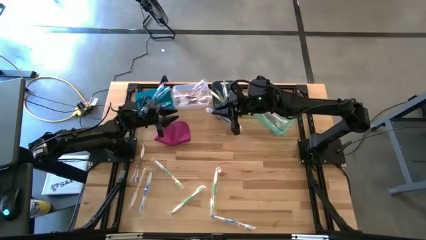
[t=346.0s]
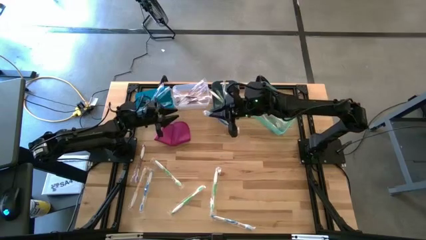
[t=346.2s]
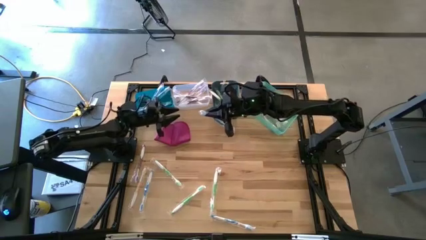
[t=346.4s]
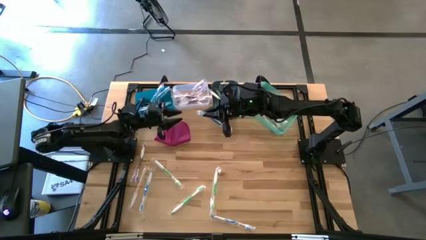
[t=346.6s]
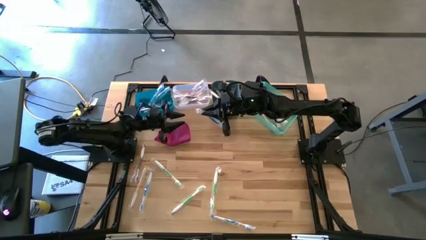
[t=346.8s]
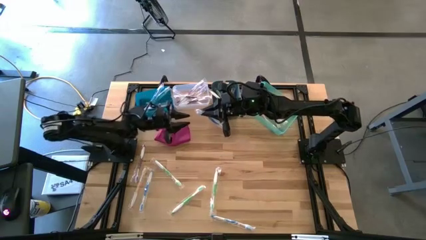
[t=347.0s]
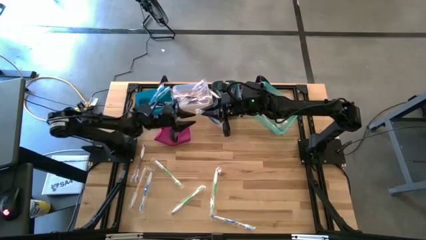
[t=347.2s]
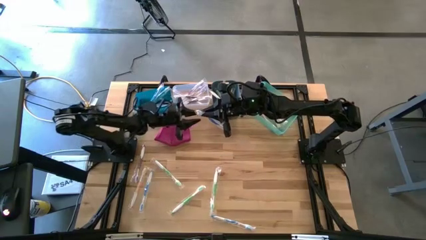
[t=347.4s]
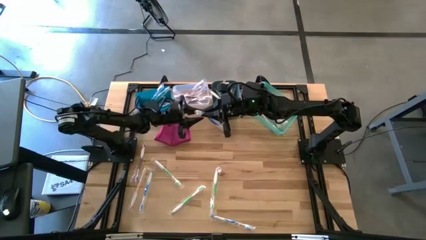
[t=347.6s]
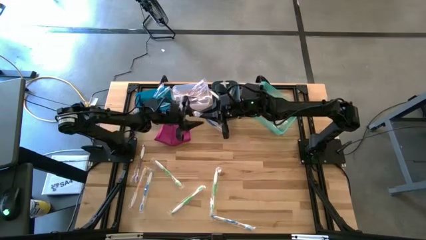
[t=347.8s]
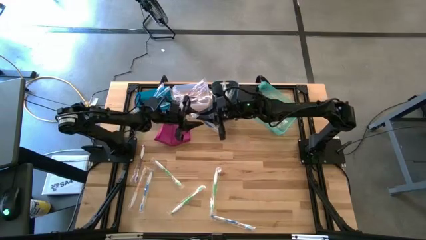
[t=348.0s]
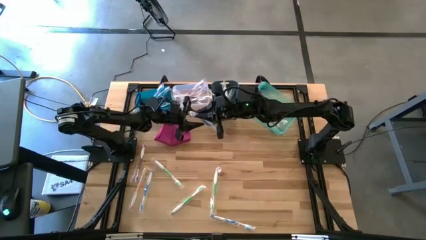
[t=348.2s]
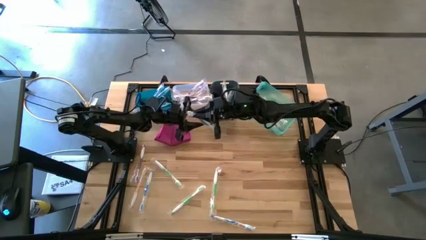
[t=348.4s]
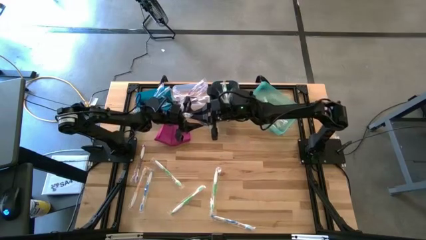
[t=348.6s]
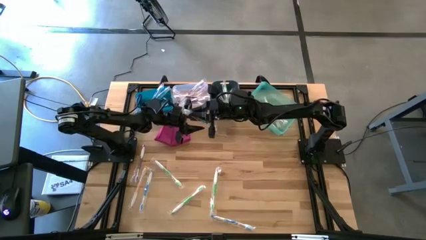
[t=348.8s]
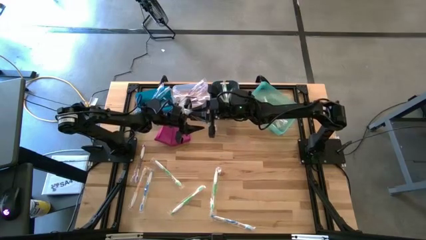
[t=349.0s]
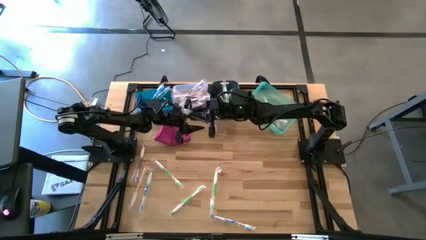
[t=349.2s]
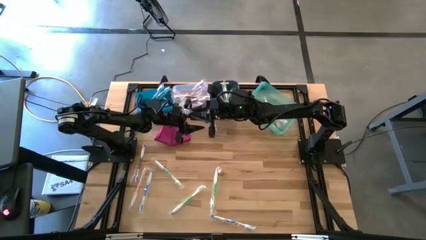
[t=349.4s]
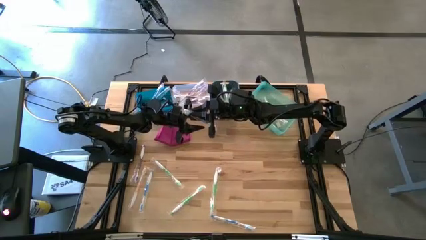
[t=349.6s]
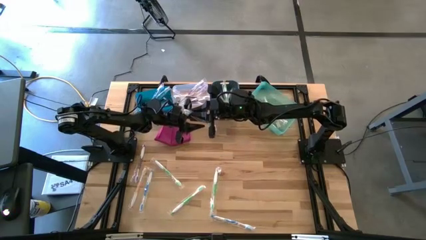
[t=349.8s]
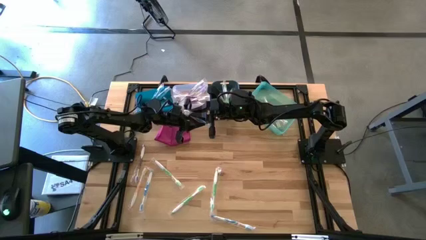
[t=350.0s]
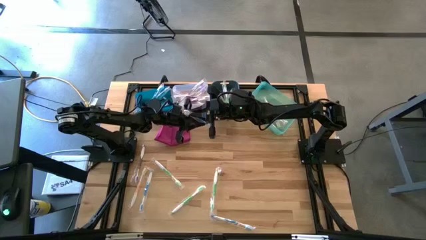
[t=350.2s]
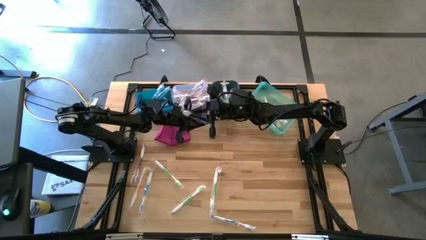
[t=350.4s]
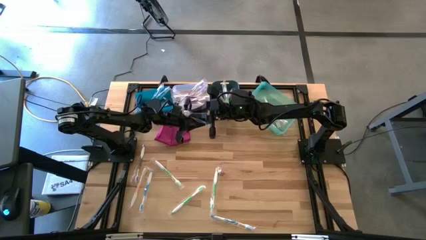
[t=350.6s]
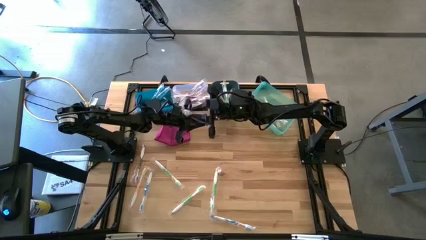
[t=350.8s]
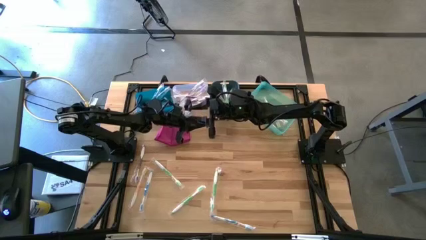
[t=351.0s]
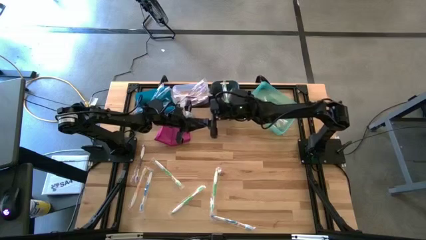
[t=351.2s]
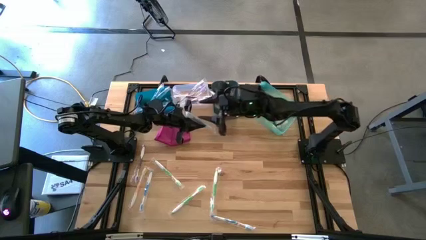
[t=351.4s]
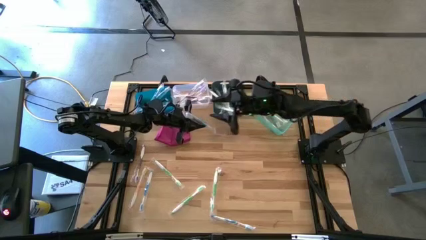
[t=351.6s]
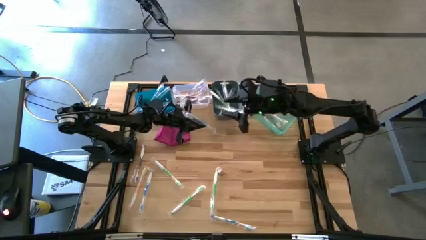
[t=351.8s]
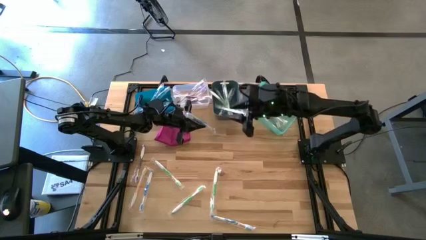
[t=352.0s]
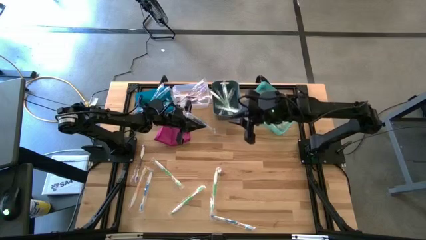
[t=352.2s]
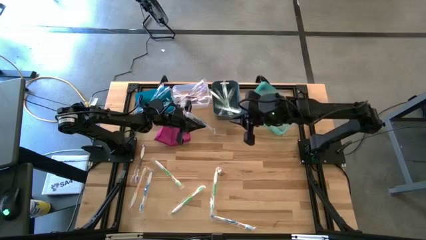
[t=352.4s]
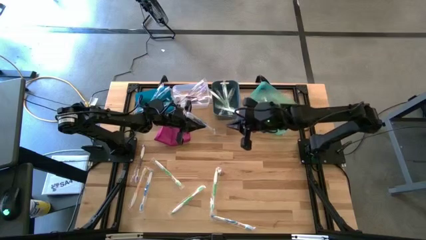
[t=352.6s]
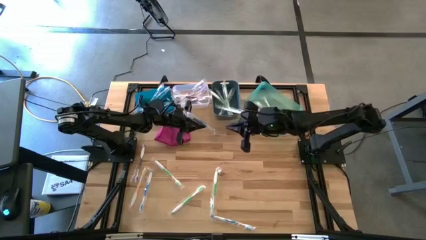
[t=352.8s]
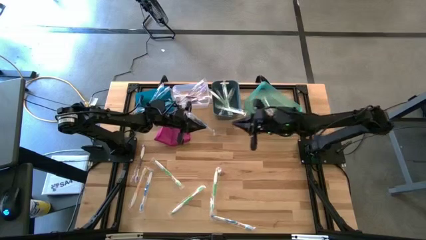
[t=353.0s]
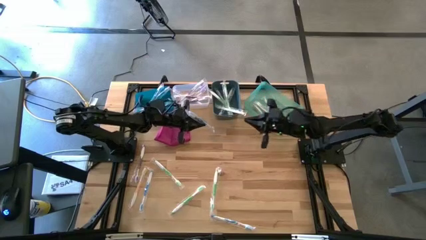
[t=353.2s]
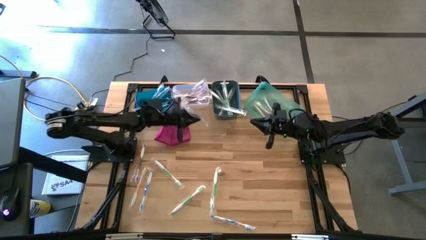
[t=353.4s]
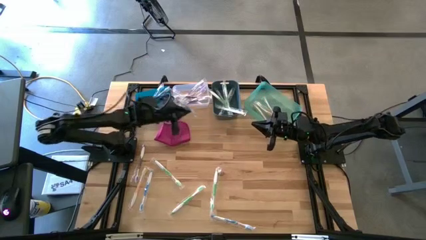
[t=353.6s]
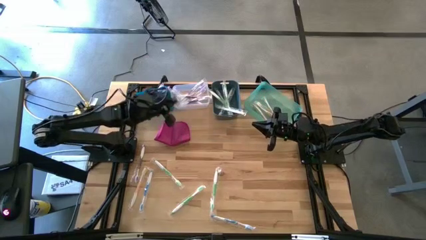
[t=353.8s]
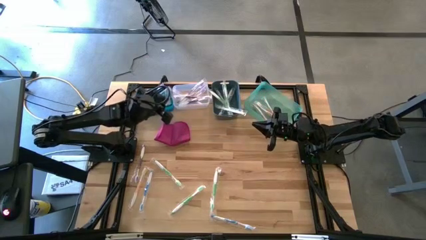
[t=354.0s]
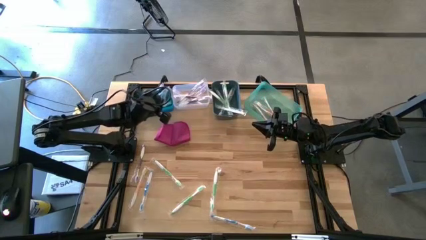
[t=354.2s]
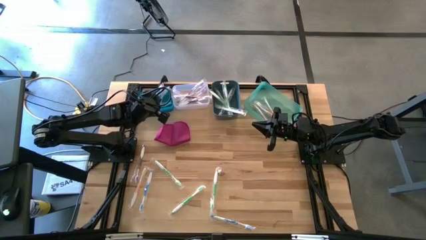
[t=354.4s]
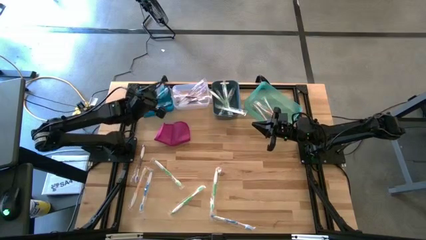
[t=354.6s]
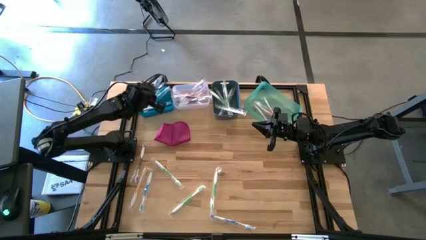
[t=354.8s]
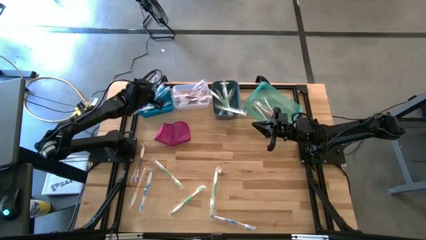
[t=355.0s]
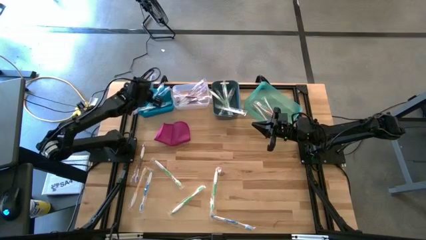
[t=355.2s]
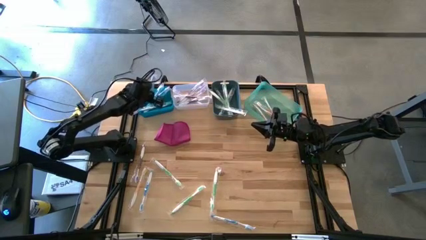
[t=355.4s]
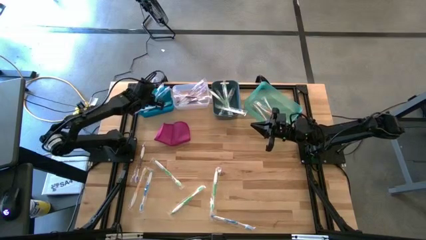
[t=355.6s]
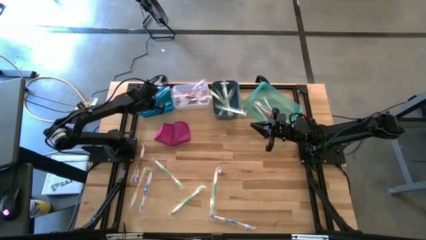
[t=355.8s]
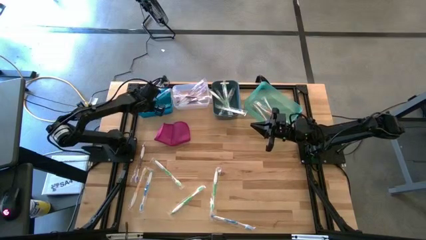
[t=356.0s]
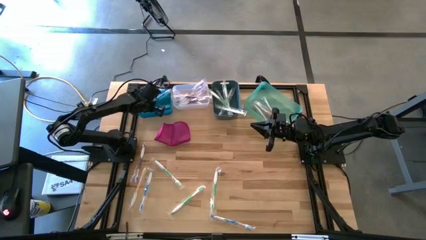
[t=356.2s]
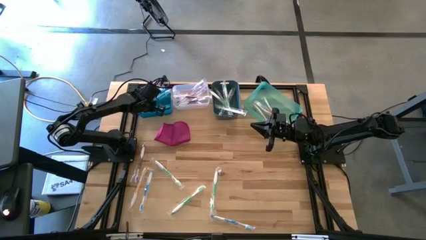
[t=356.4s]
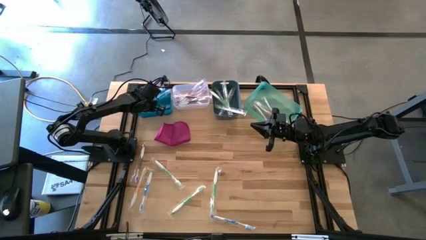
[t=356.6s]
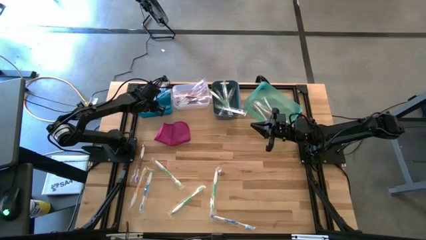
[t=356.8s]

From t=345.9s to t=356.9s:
Task: Pick & Place Toothbrushes
Put the blue toothbrush into the blue bin

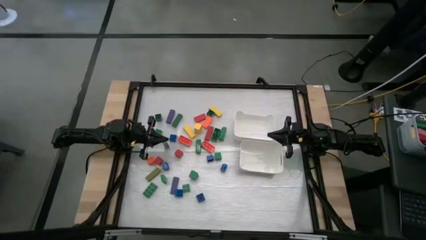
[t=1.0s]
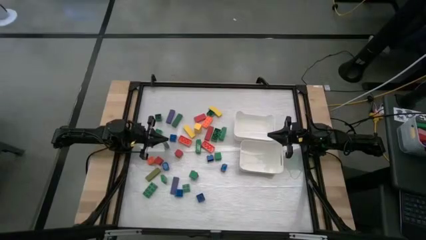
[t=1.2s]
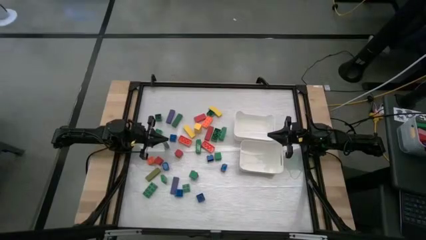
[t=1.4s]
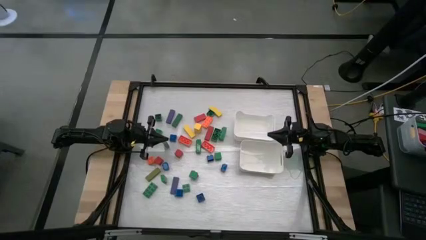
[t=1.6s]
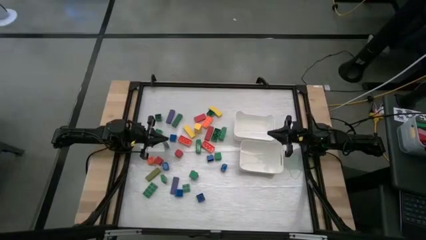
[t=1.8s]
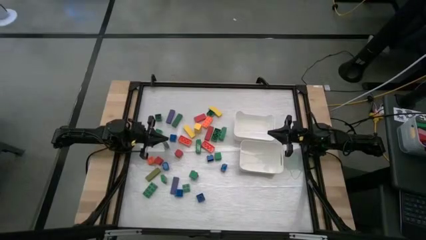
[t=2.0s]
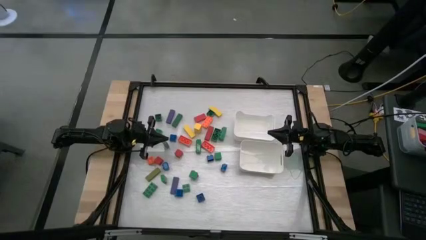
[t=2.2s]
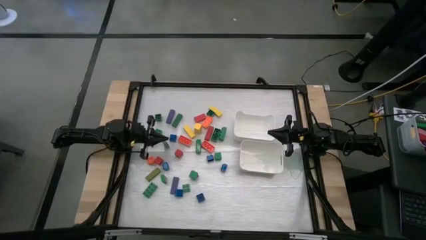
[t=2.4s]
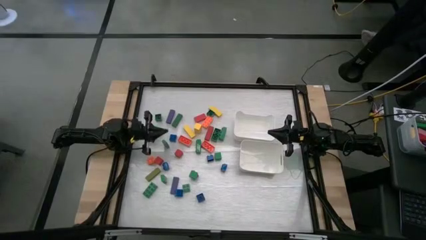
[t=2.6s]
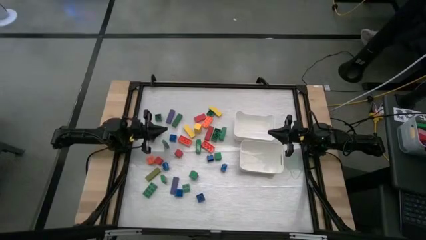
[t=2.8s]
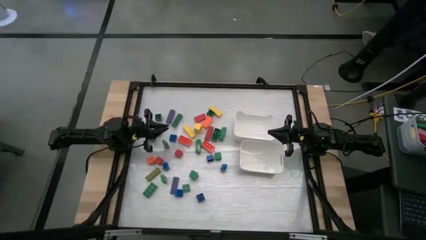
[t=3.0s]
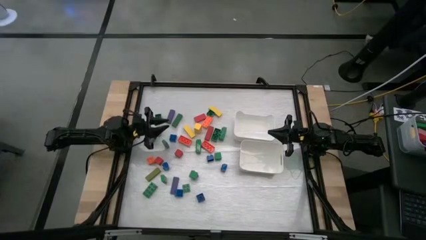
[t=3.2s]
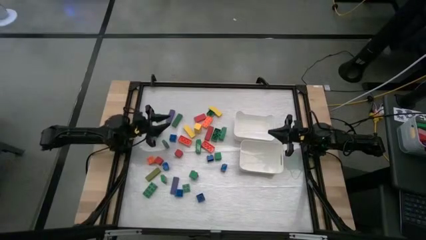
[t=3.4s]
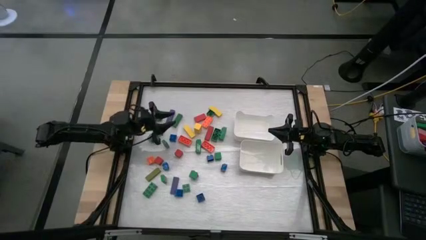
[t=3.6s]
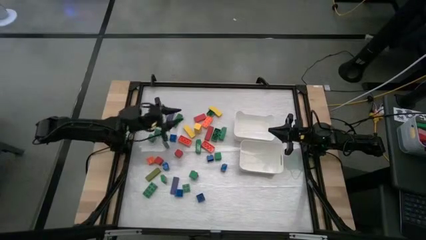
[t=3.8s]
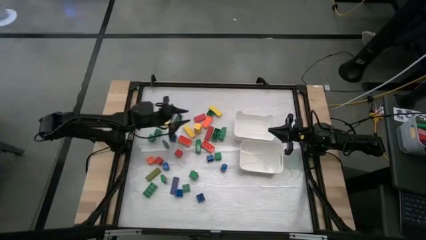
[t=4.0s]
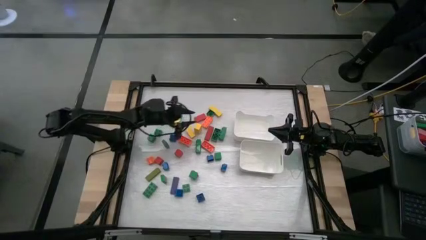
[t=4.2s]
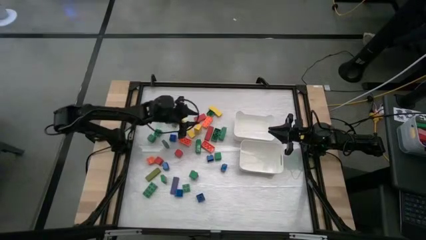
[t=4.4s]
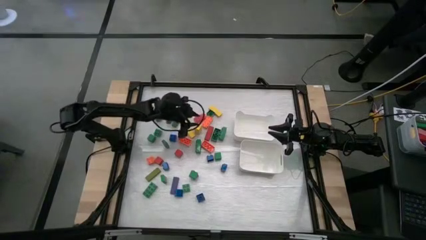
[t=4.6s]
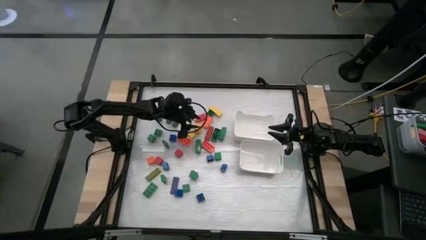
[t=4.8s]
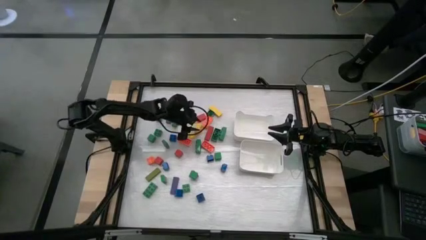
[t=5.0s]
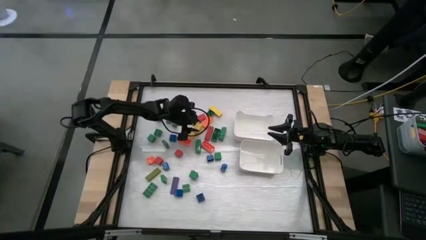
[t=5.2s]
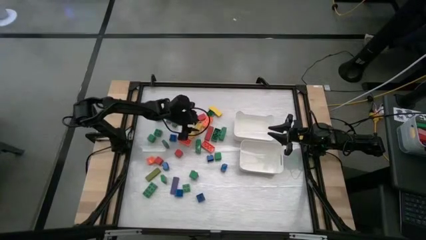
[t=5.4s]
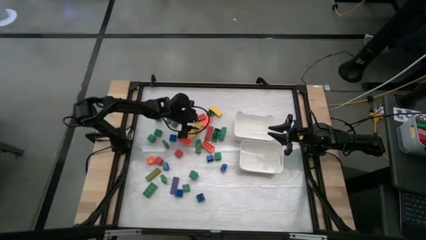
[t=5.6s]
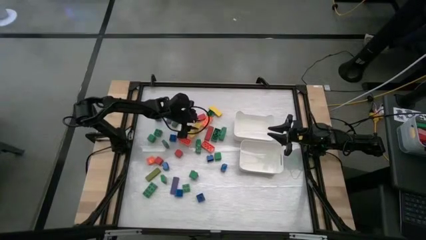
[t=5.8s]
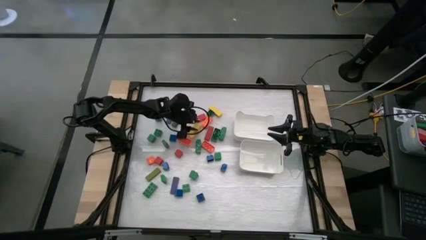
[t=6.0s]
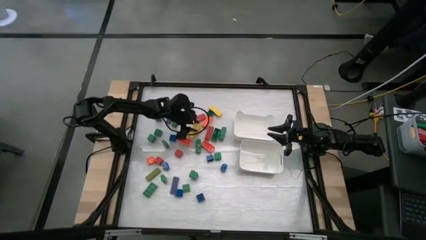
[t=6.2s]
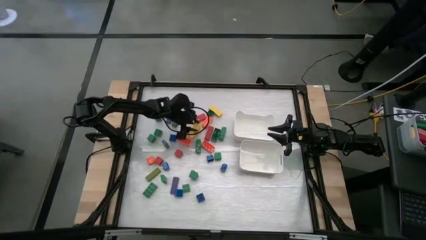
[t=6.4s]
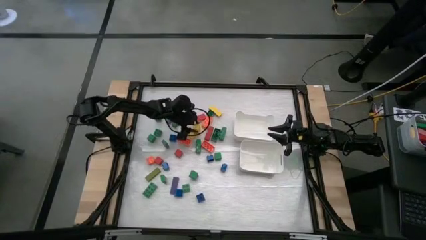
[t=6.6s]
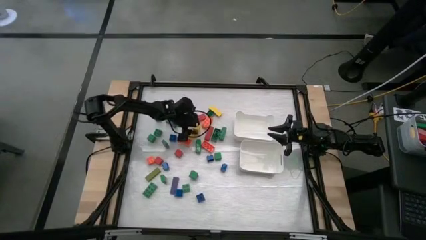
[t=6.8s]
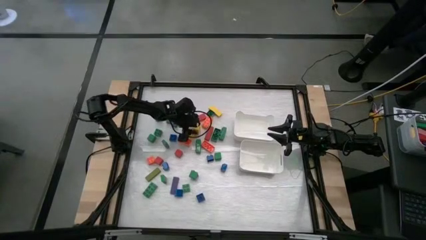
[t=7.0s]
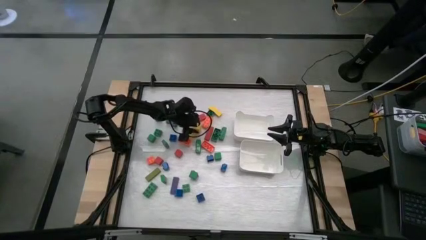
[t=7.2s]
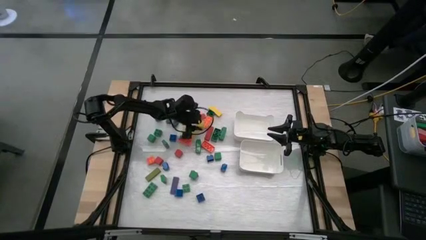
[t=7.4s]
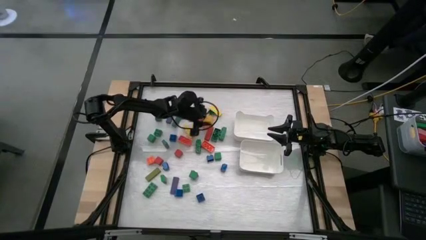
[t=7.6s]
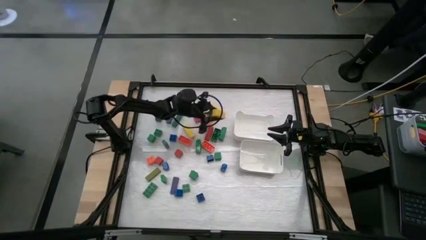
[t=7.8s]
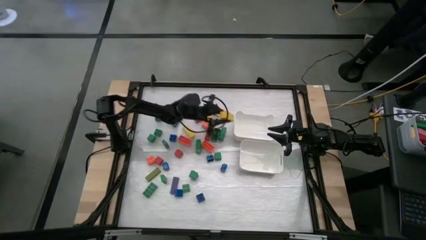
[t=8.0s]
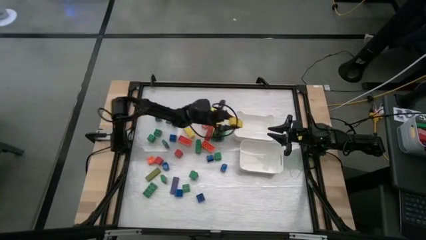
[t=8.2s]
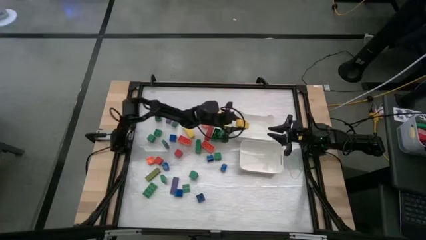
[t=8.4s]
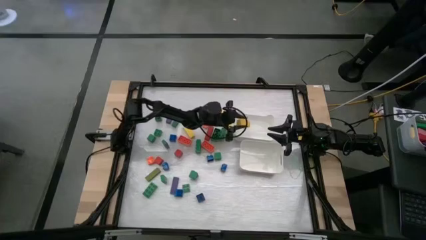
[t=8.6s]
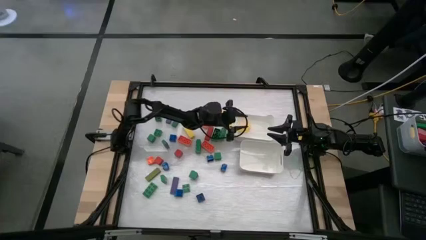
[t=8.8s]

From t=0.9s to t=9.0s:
Task: Sort blocks by size
Put the yellow thick rectangle block into the top white bin
